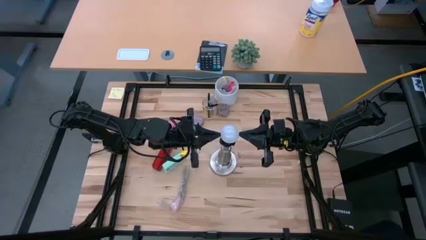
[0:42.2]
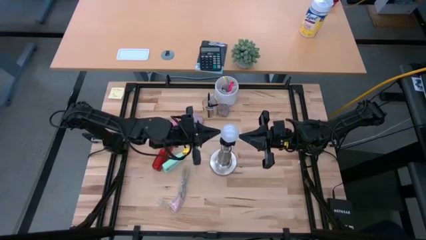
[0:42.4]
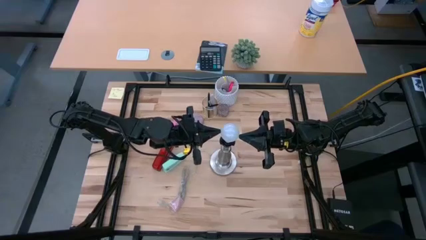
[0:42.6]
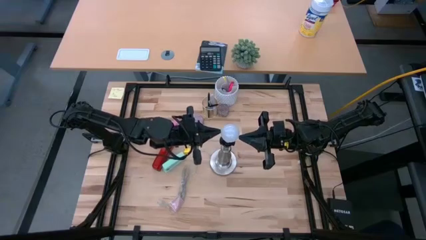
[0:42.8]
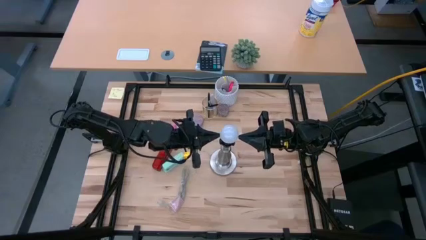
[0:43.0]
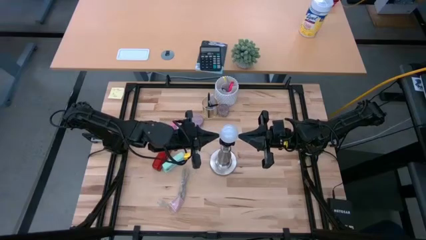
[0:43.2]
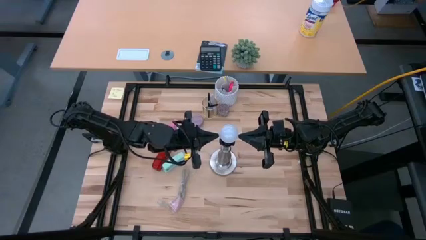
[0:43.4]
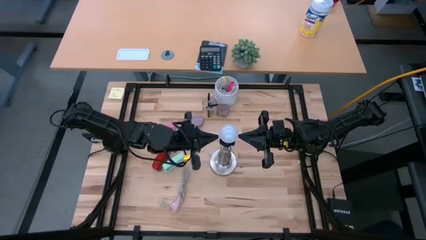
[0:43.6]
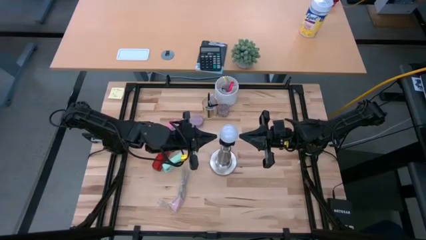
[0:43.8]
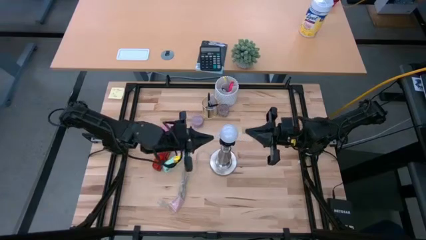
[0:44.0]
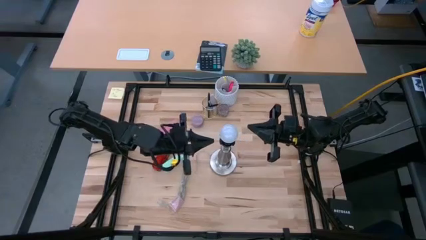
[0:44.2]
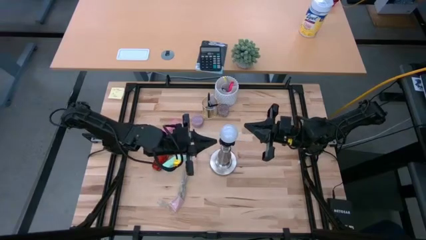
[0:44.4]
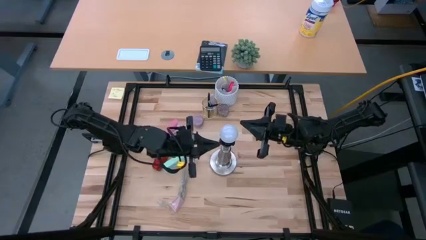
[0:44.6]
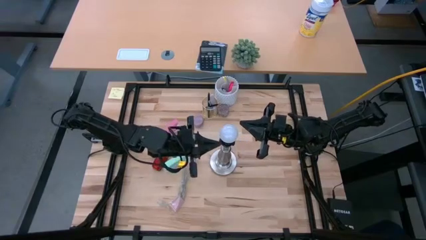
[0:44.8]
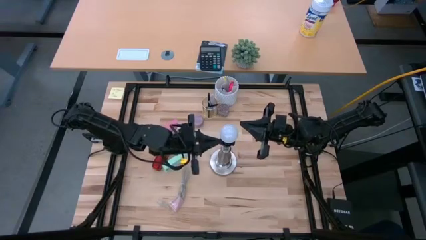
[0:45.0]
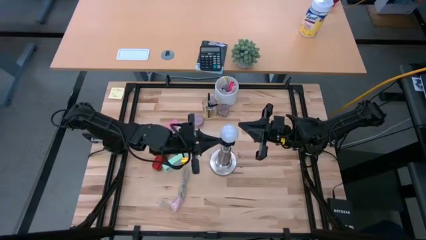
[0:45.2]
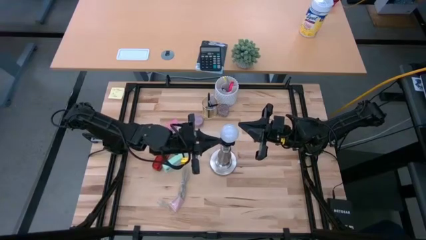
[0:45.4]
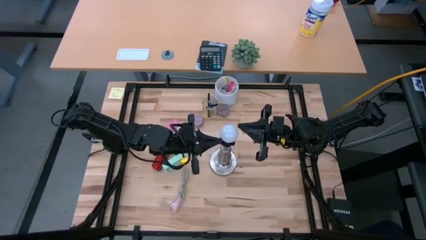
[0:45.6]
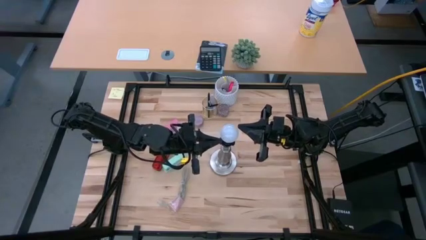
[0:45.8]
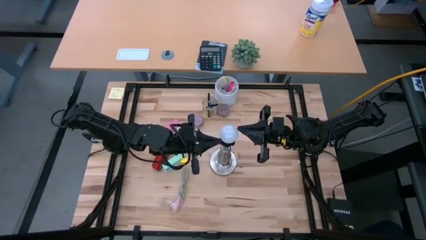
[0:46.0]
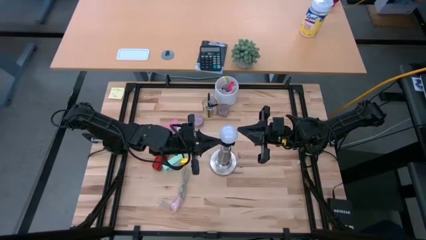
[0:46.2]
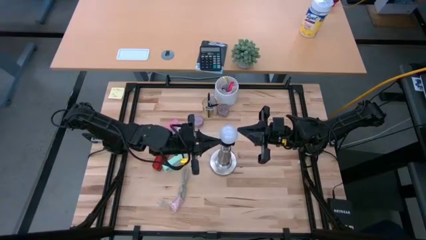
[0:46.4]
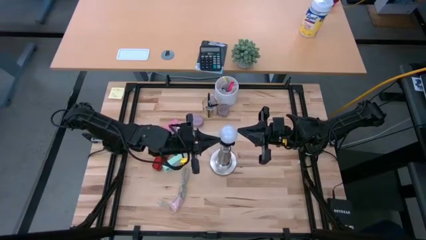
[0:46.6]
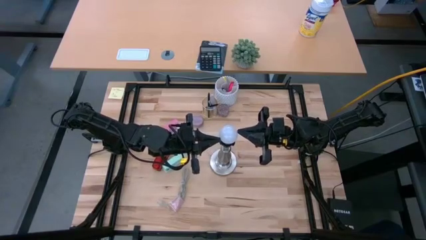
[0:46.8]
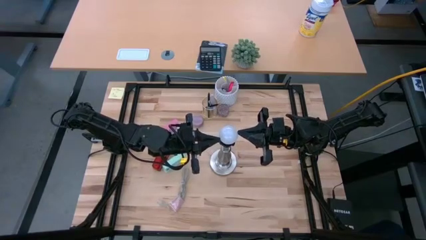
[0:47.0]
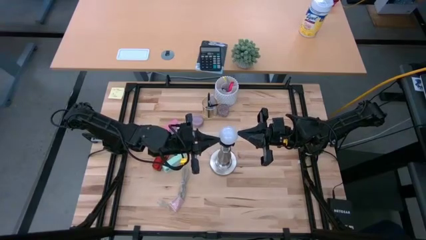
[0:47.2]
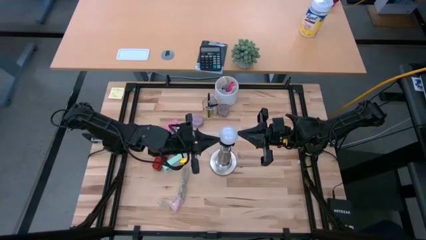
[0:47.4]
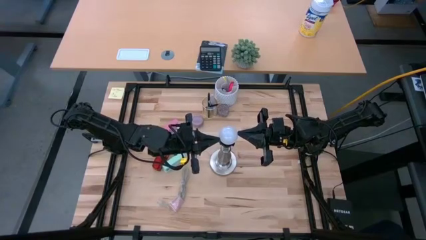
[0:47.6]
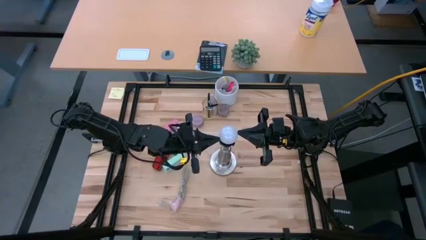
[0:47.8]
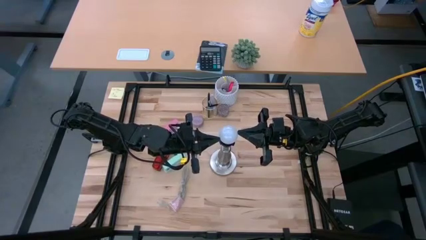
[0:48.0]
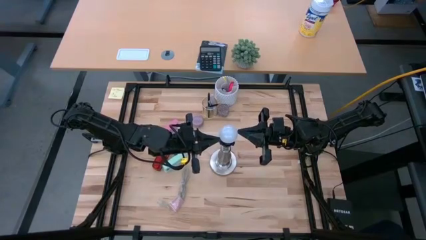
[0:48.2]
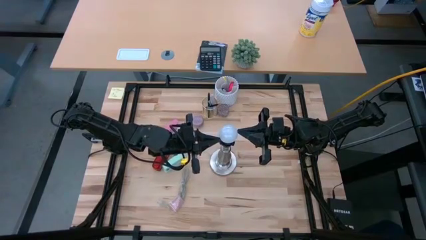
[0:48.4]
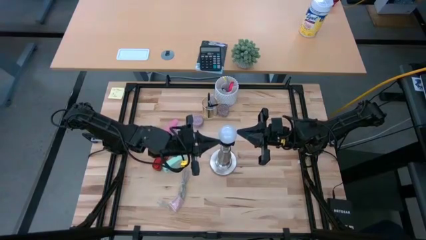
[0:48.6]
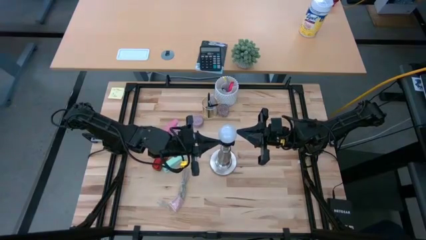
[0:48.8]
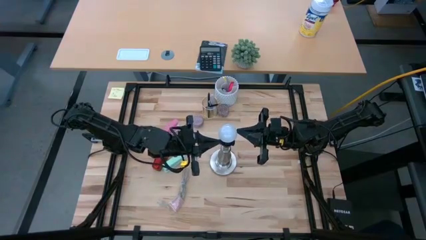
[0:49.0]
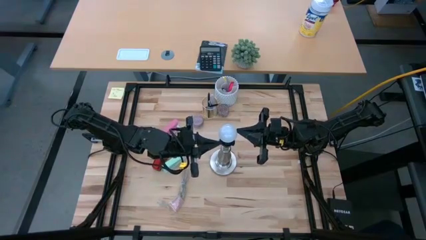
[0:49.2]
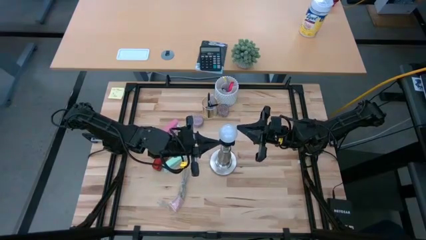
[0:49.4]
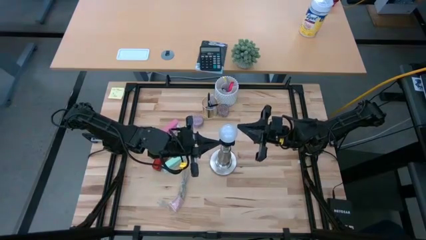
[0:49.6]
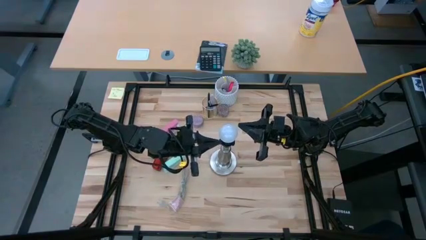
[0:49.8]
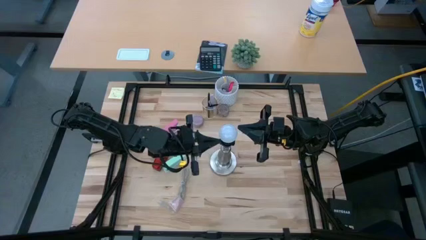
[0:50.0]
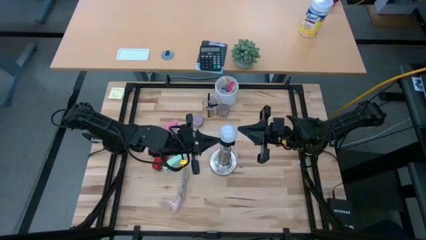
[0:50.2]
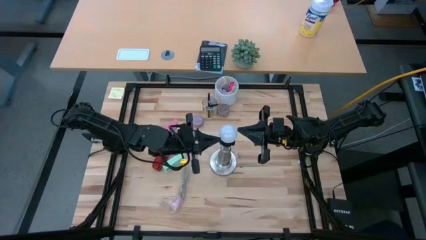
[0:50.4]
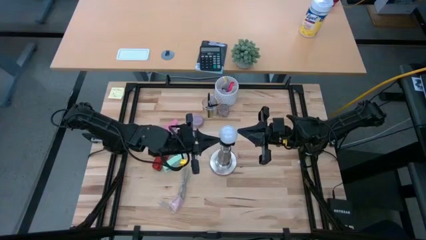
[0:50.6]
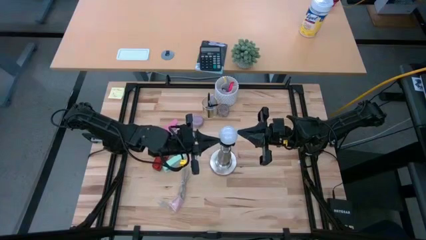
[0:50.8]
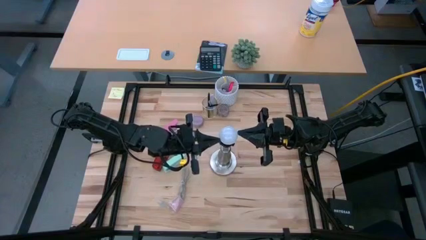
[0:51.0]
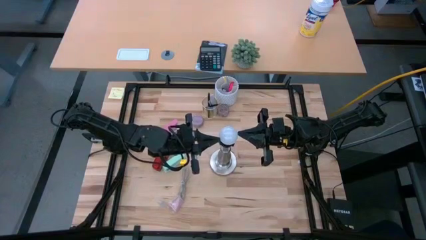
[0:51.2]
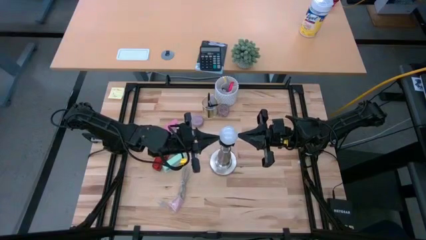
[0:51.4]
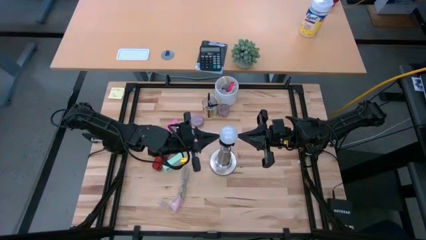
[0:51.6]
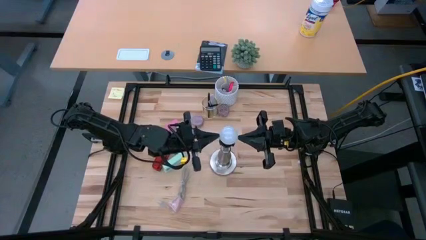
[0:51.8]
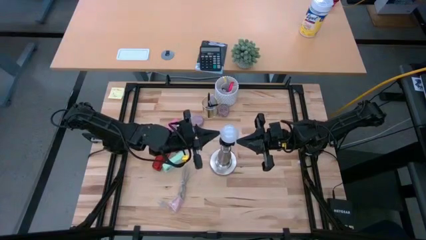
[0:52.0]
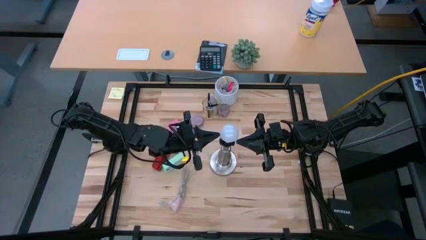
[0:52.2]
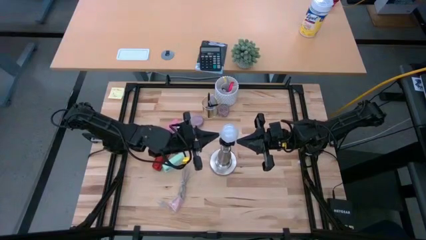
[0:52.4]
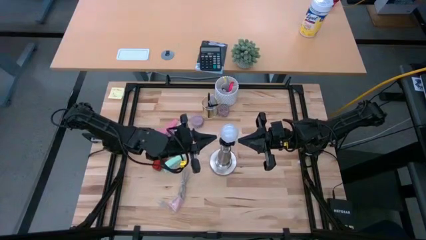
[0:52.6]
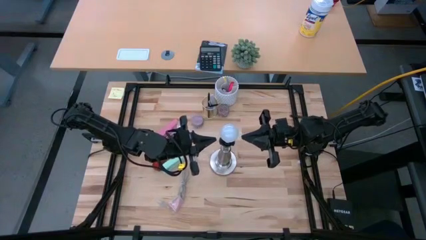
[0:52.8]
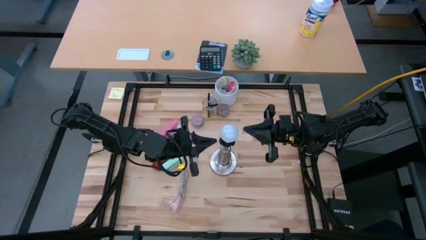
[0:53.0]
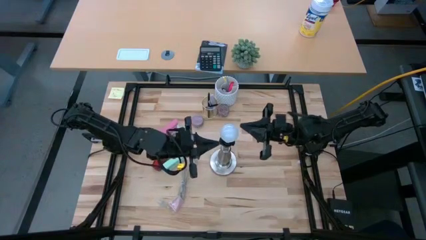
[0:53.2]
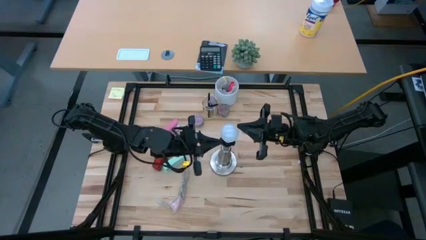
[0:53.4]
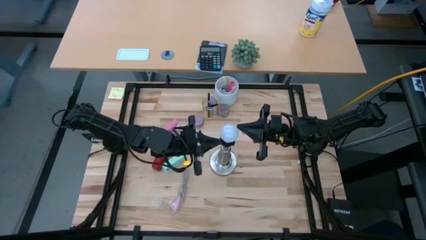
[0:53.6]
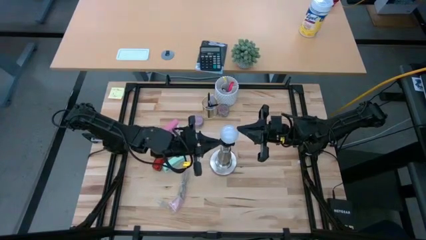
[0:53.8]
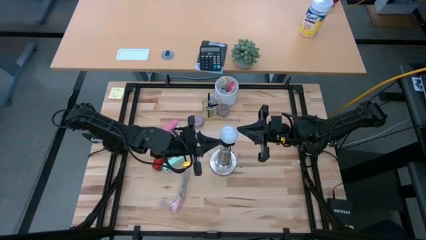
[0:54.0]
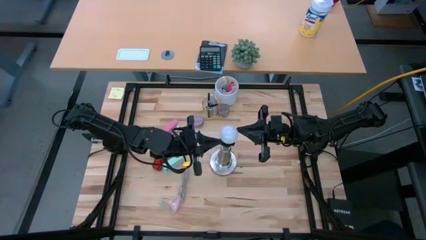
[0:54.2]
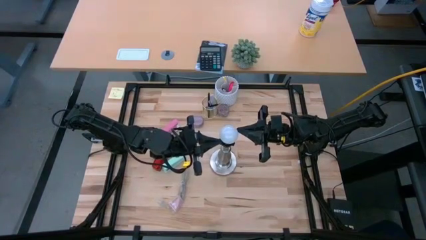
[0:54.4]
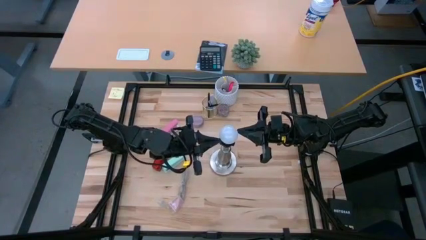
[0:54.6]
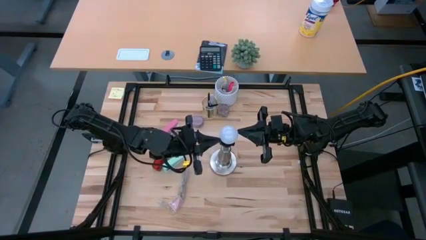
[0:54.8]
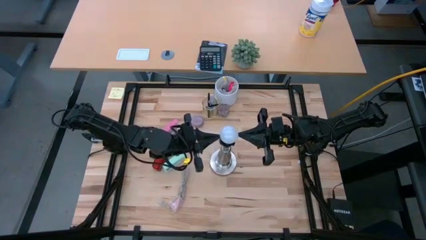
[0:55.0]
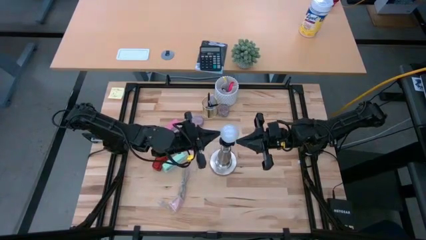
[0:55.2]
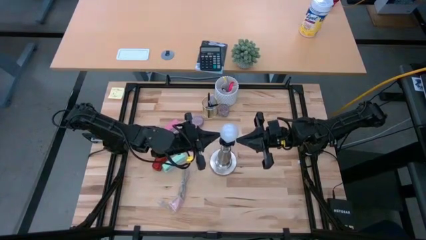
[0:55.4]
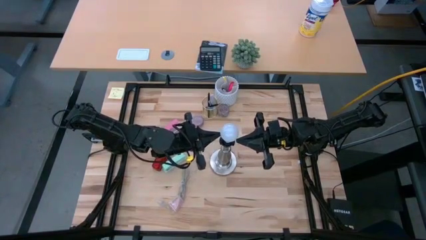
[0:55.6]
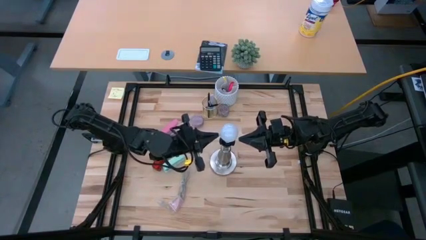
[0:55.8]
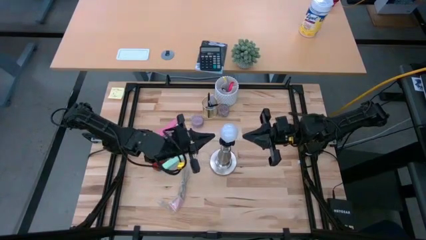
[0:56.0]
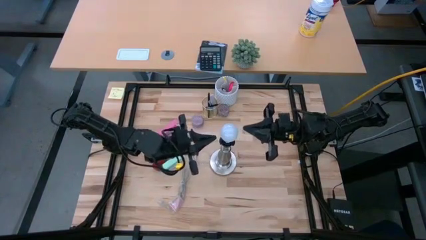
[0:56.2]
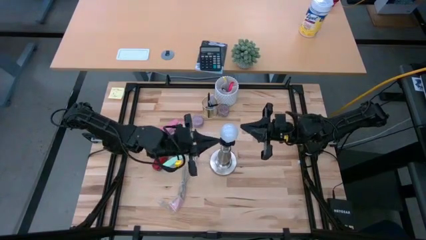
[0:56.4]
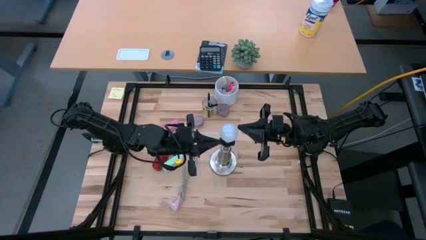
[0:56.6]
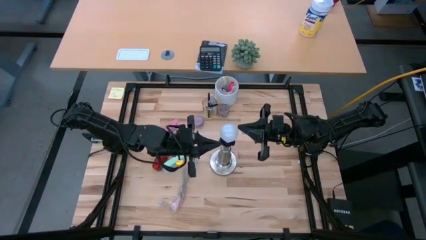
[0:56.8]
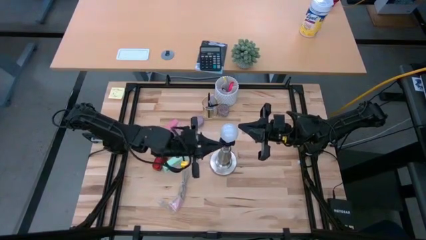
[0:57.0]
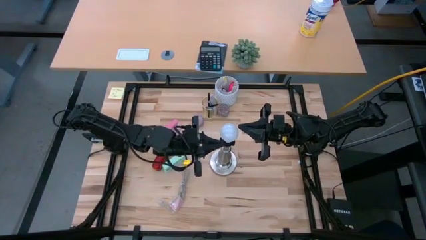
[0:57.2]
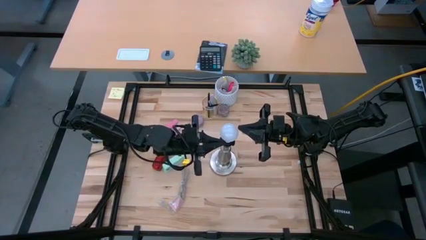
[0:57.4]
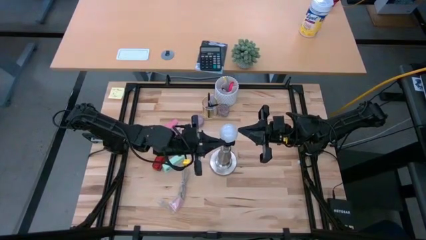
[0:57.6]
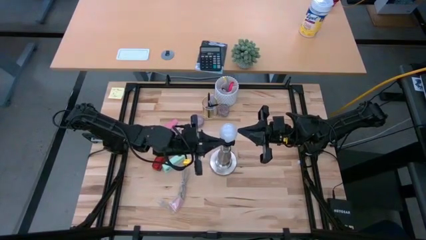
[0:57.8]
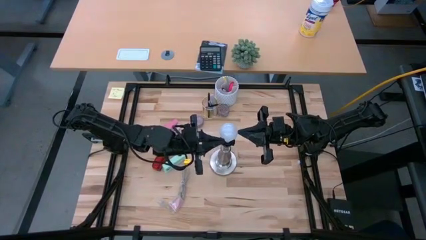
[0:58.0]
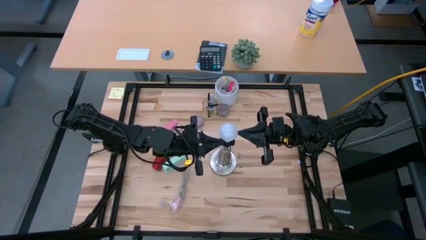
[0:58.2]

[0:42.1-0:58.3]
Task: Screw lightbulb
Insert the lightbulb to the lamp
